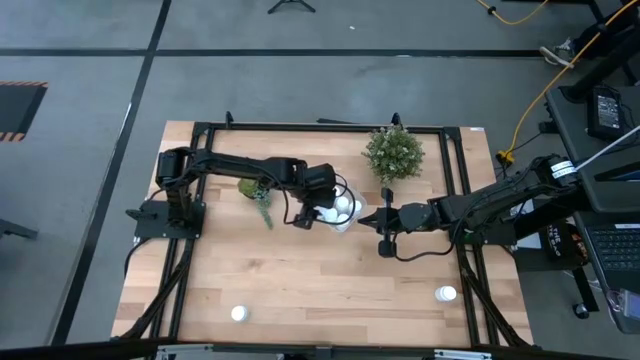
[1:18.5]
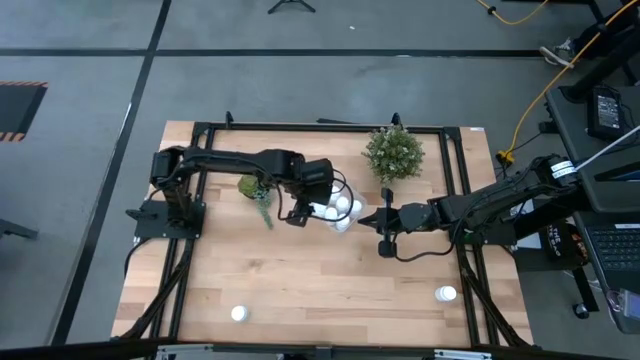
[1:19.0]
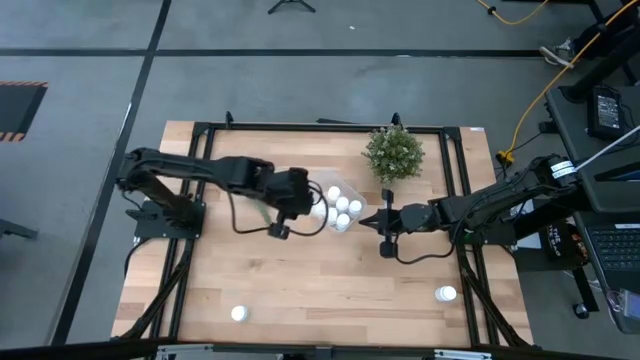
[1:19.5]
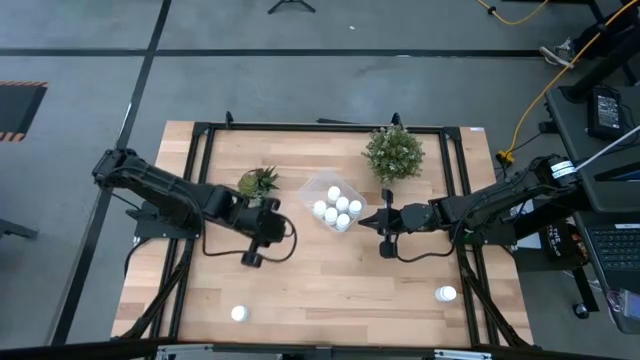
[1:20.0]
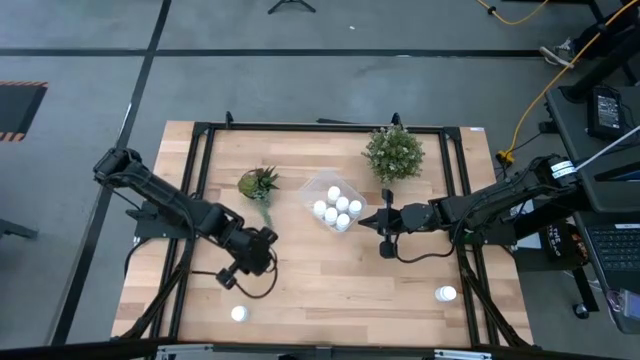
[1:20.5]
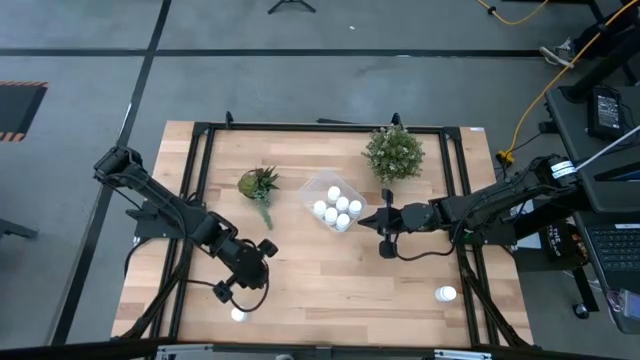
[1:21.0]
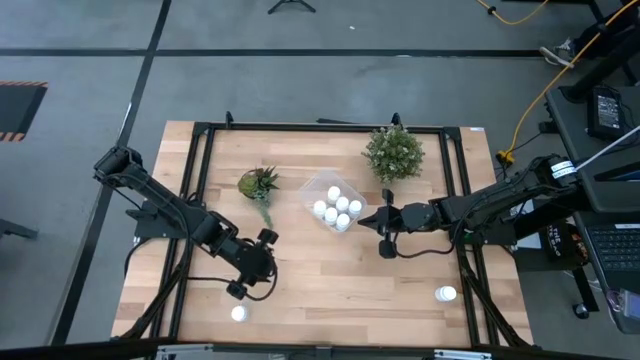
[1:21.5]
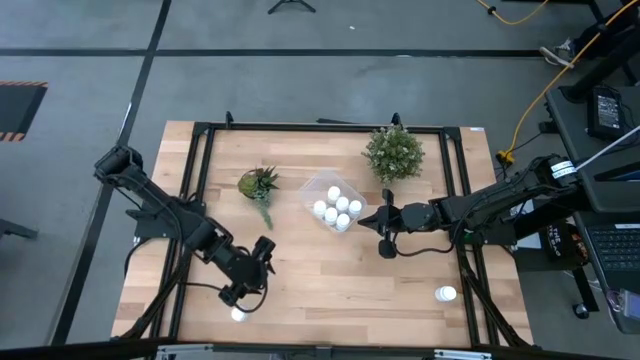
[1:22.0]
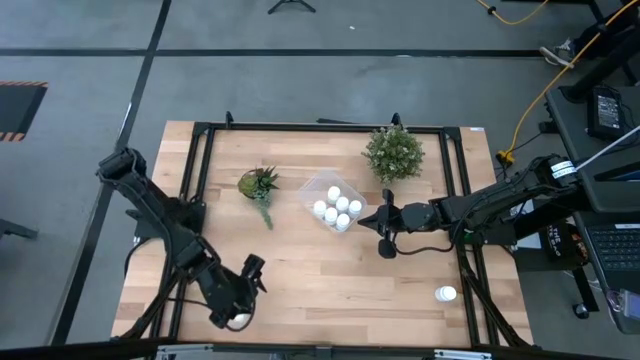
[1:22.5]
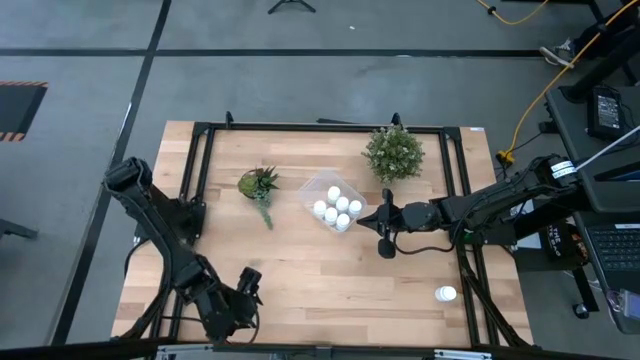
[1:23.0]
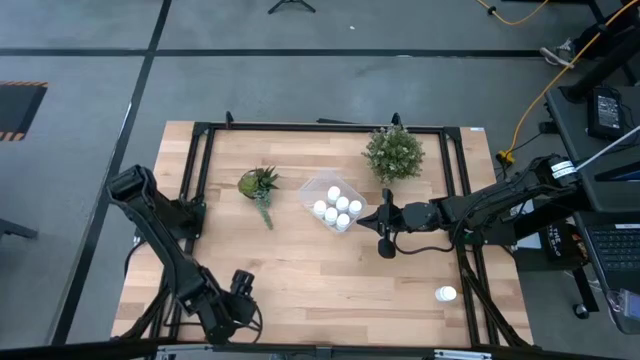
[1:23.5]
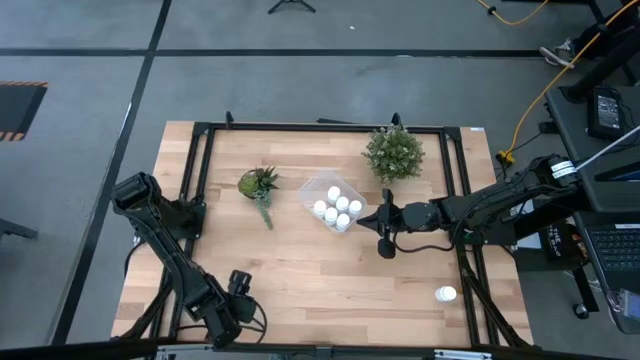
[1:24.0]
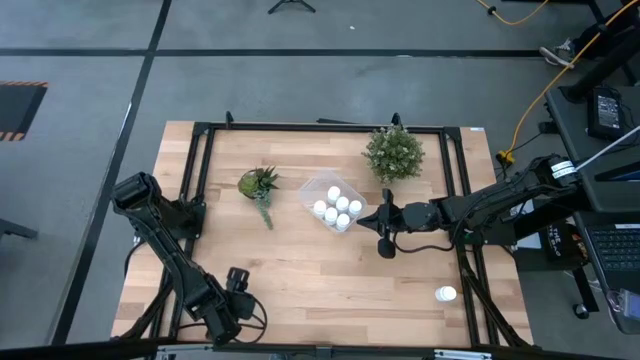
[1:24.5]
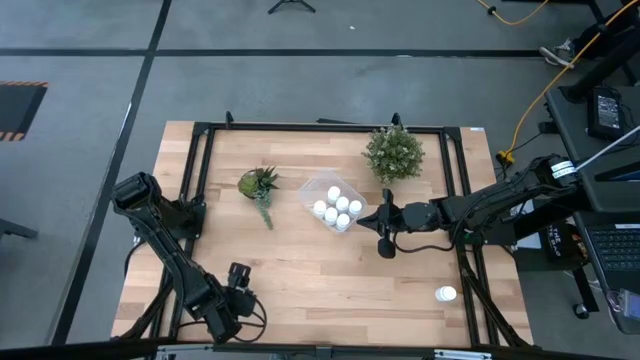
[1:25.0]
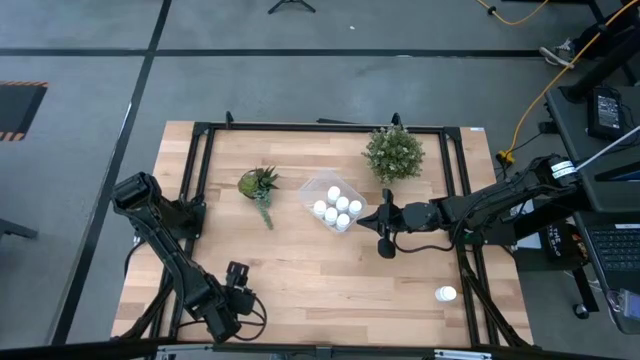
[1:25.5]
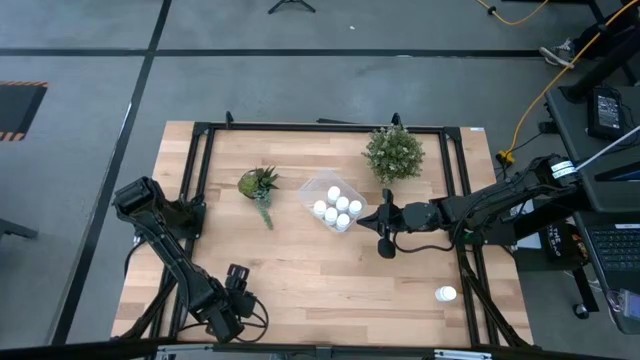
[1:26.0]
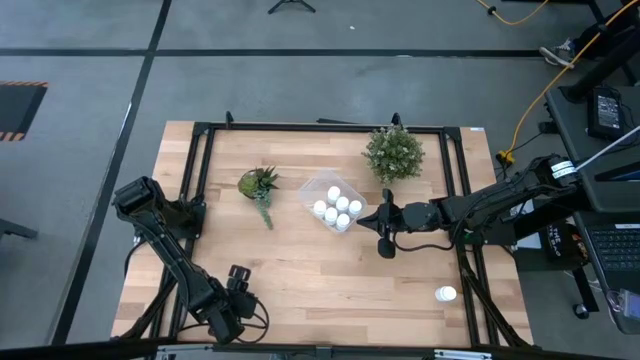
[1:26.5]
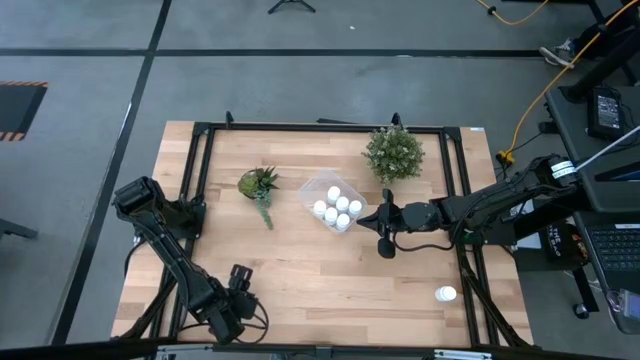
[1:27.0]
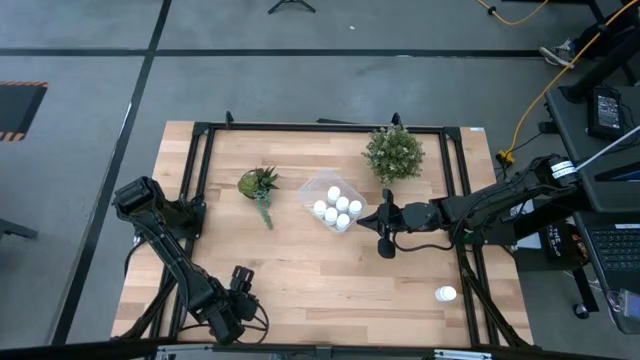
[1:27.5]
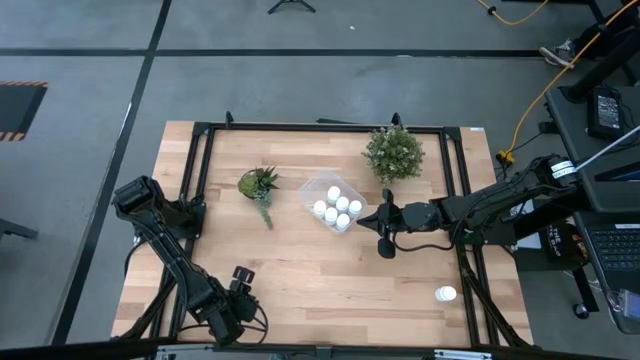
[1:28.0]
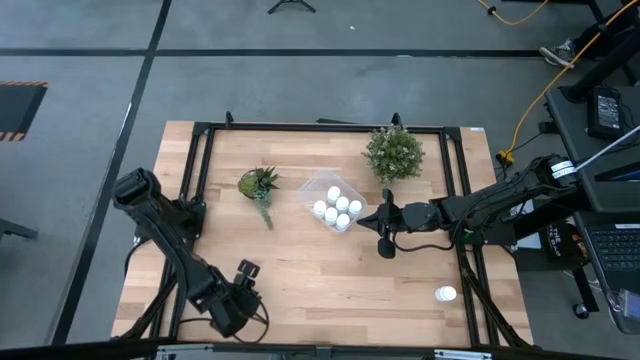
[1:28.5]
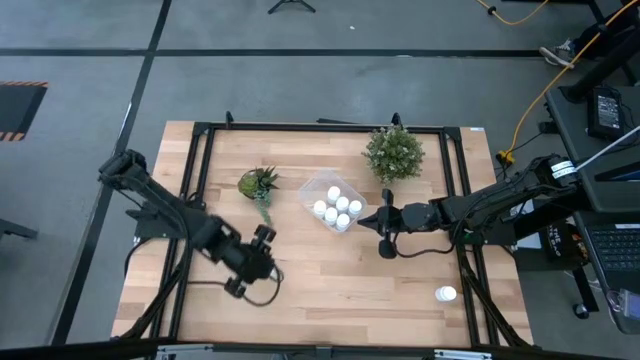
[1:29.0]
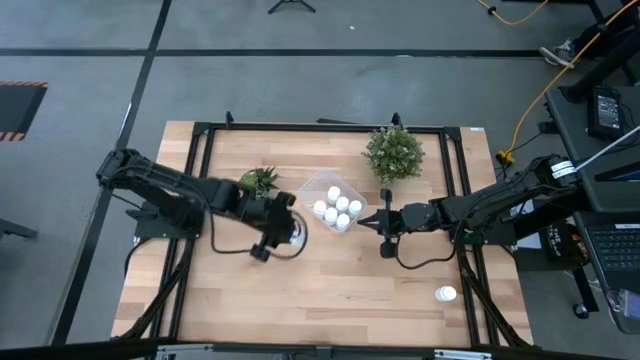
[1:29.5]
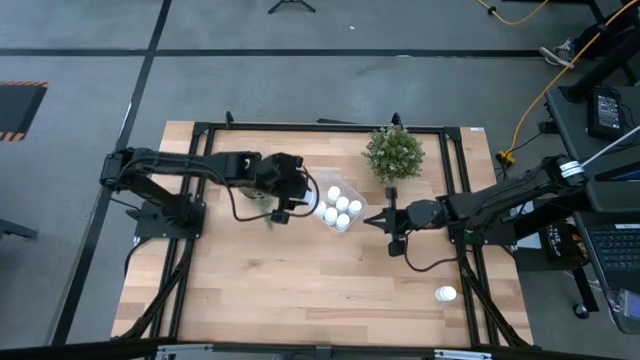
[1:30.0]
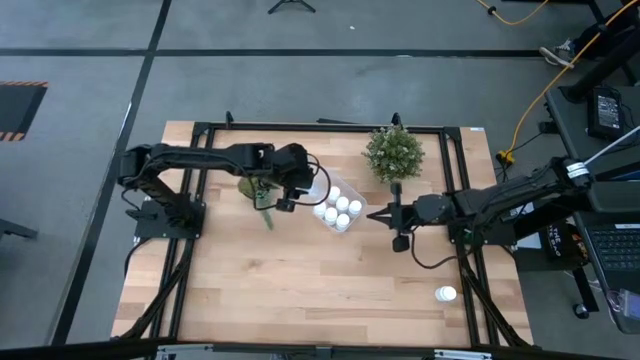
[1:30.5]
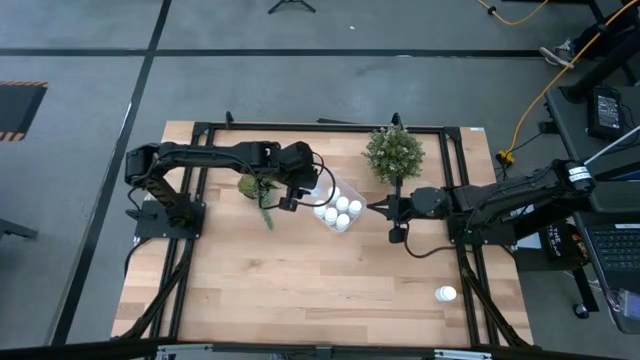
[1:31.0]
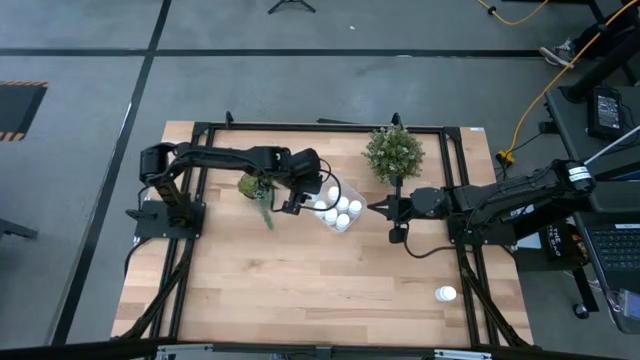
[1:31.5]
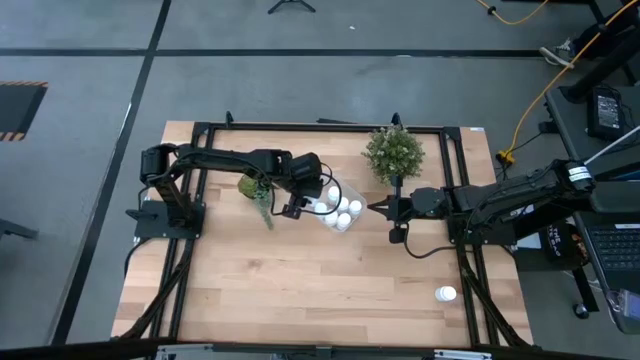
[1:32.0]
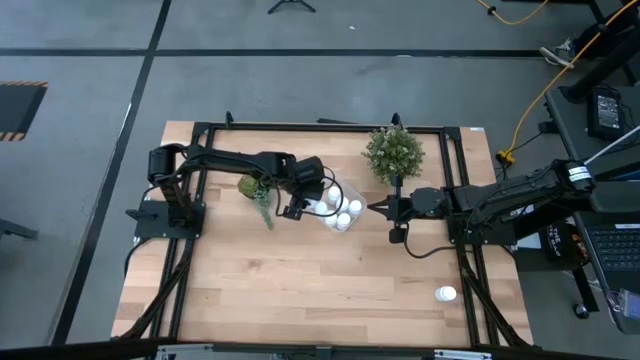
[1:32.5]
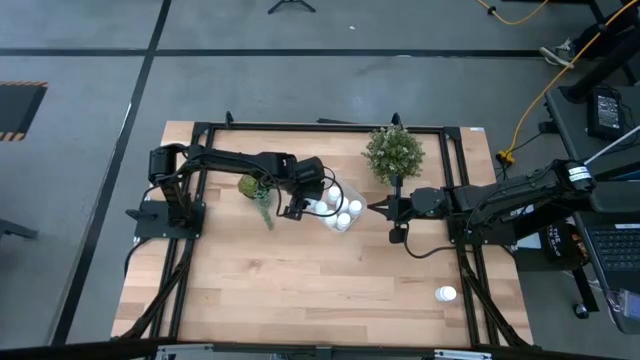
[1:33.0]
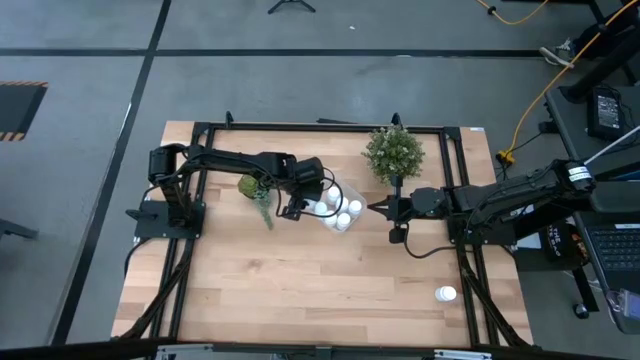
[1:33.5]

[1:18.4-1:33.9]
Task: Pick and place pill bottles into a basket
Put the left pill bottle into the transparent bin

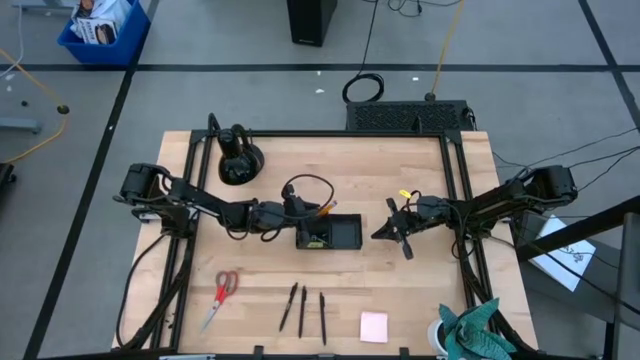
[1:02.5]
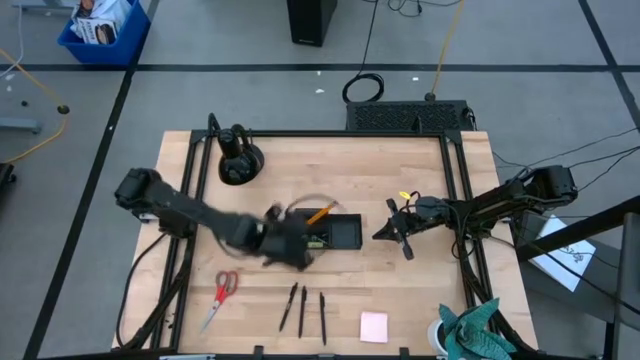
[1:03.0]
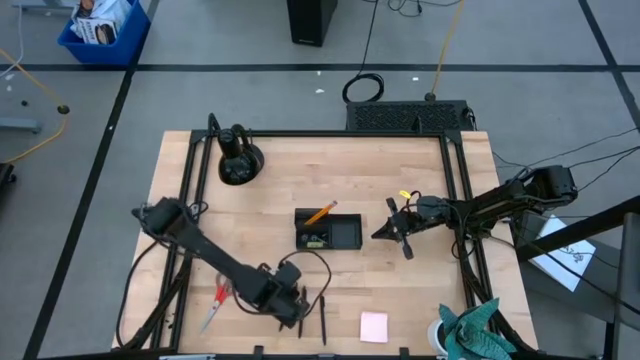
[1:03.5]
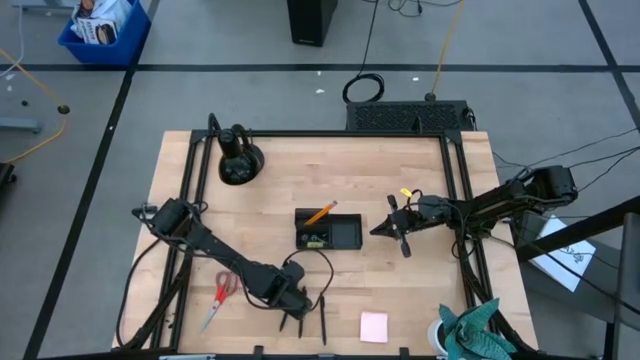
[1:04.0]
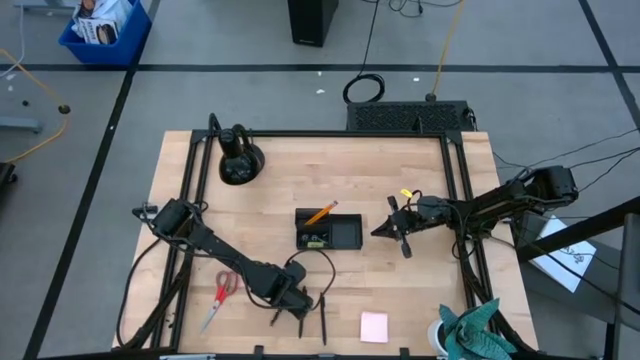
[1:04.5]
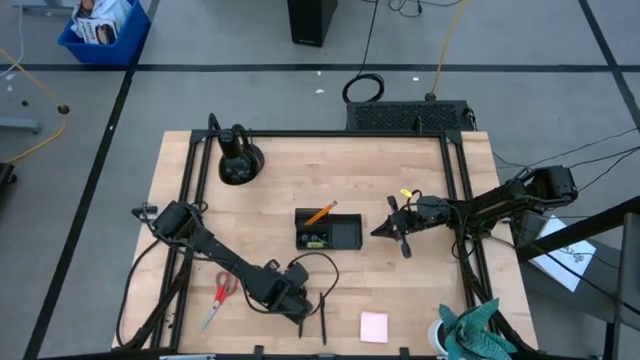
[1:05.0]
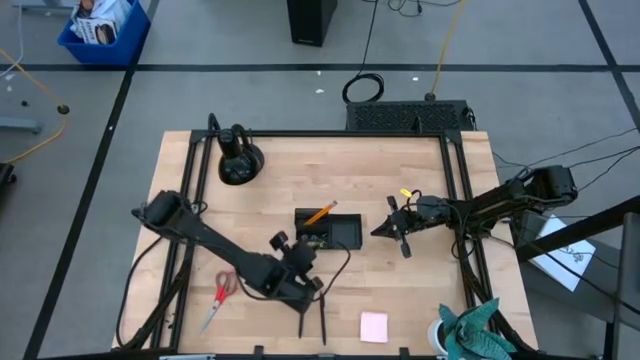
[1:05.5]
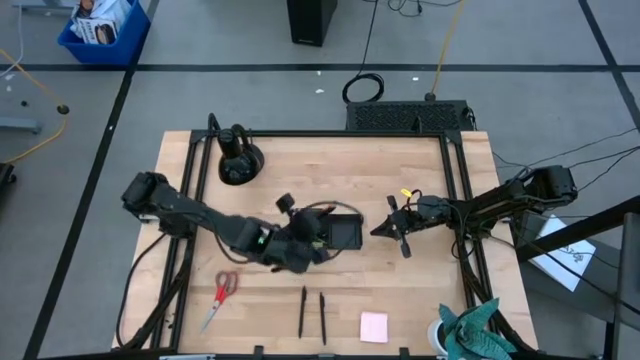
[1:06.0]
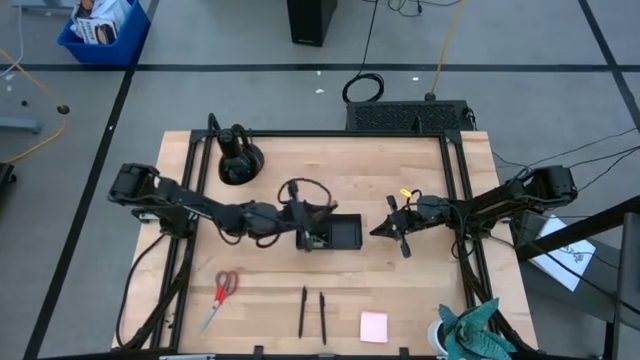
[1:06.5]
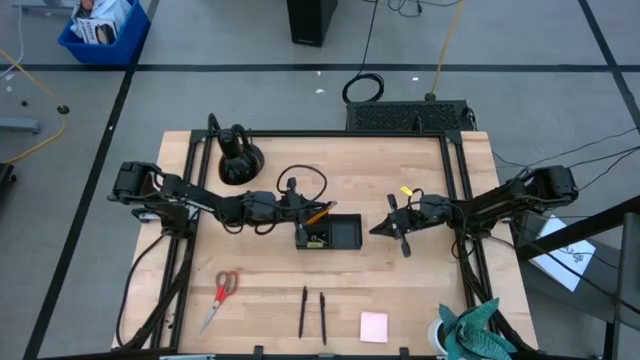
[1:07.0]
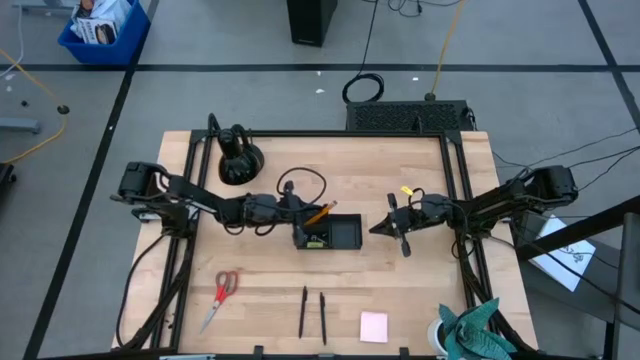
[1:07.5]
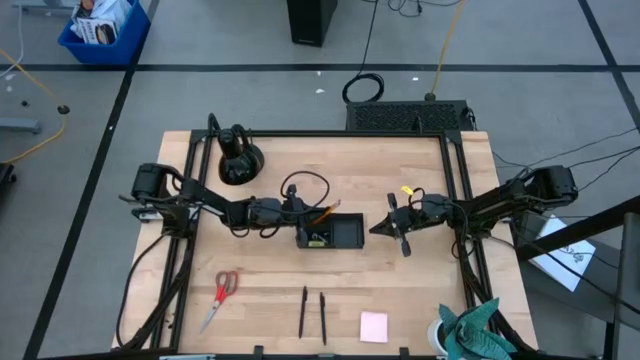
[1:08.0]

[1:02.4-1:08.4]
Task: Pick and place office supplies into organizer
Put the black pen into the black desk organizer

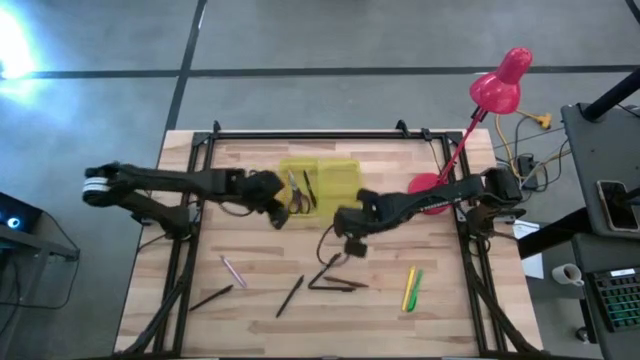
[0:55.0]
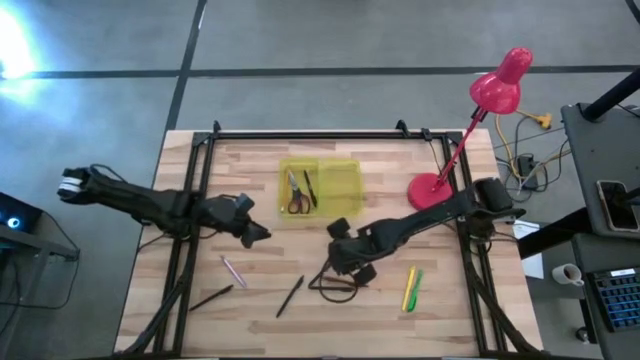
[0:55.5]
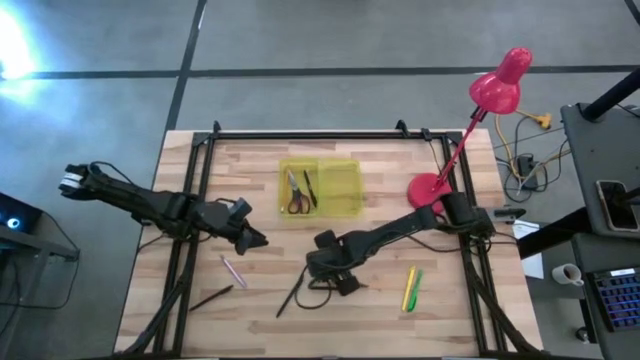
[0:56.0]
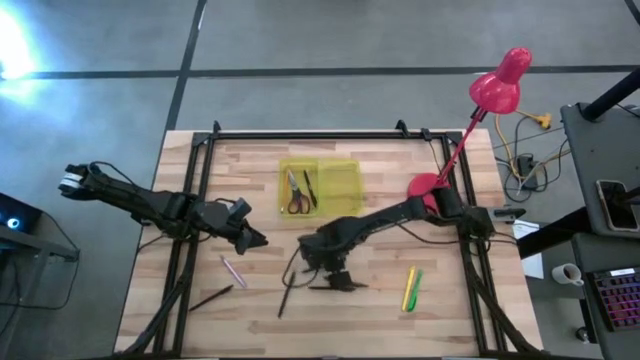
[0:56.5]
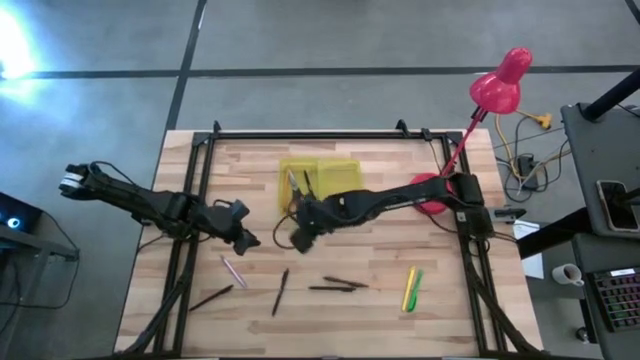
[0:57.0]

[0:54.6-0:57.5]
Task: Pick & place school supplies into a supply box
Put the black pen into the supply box
